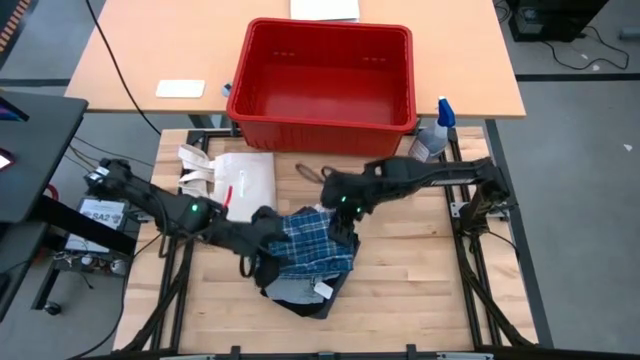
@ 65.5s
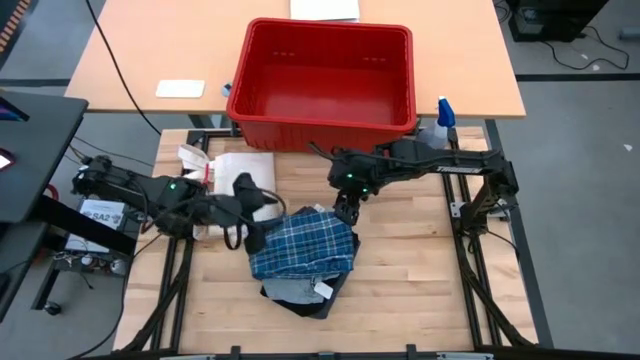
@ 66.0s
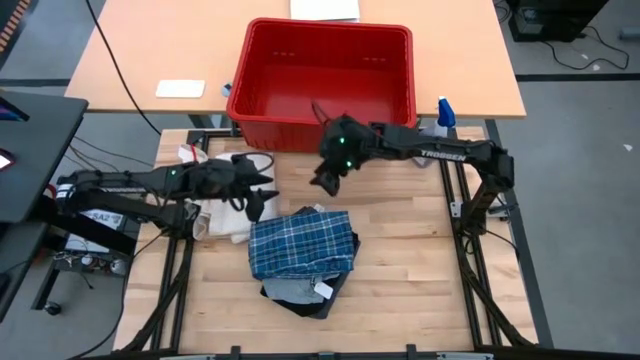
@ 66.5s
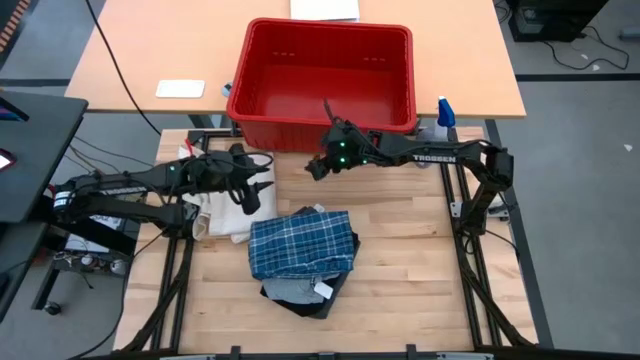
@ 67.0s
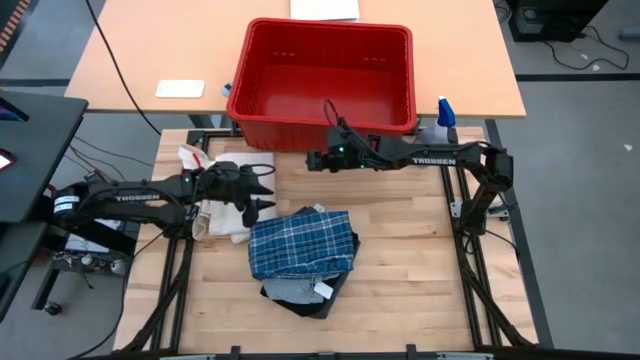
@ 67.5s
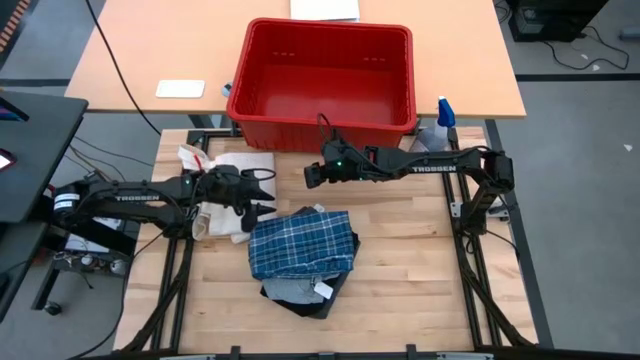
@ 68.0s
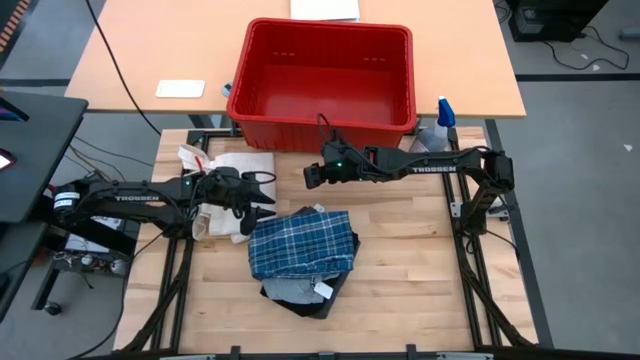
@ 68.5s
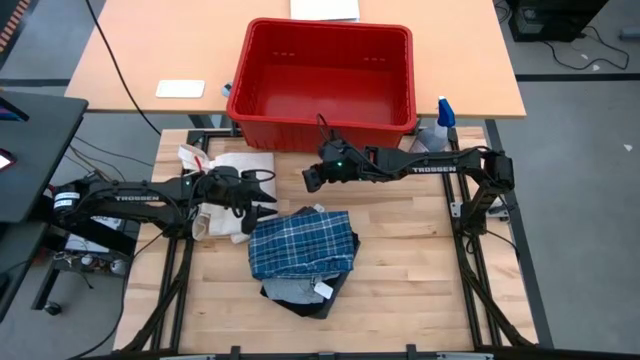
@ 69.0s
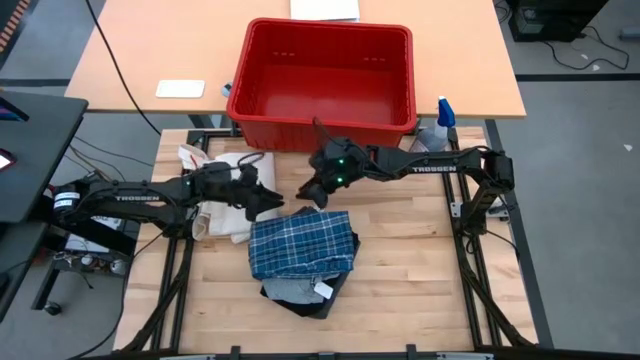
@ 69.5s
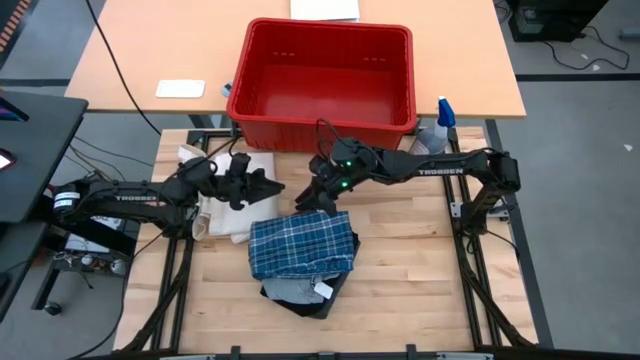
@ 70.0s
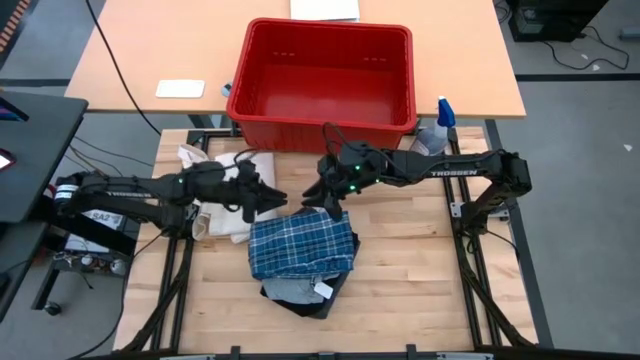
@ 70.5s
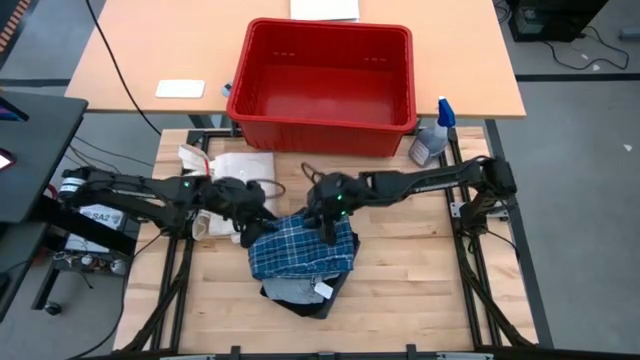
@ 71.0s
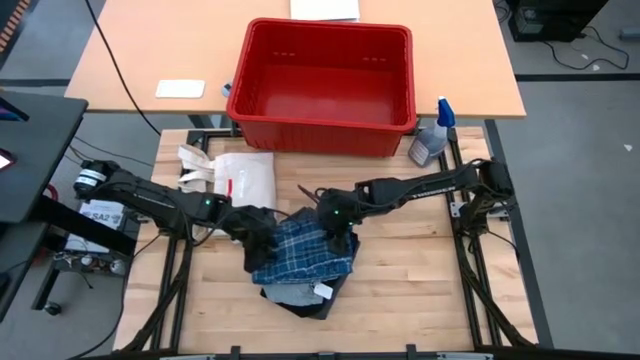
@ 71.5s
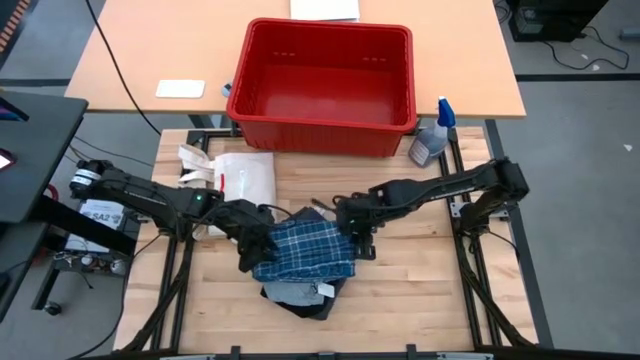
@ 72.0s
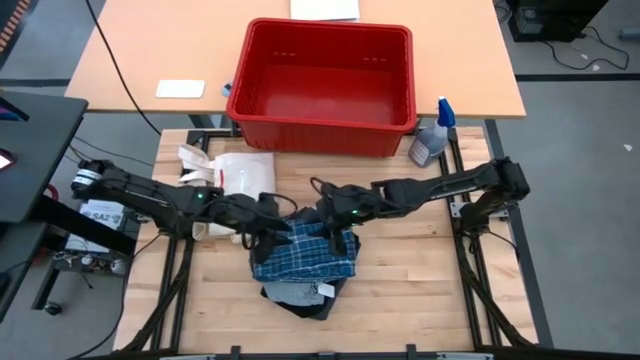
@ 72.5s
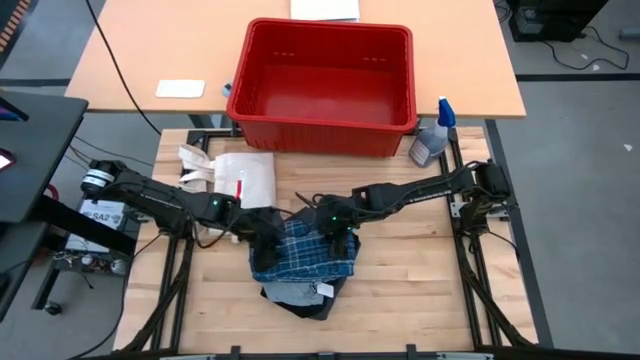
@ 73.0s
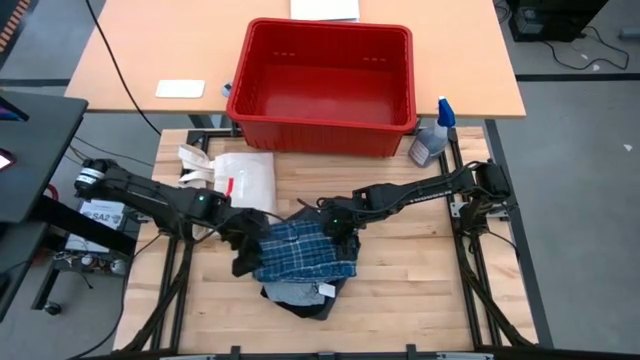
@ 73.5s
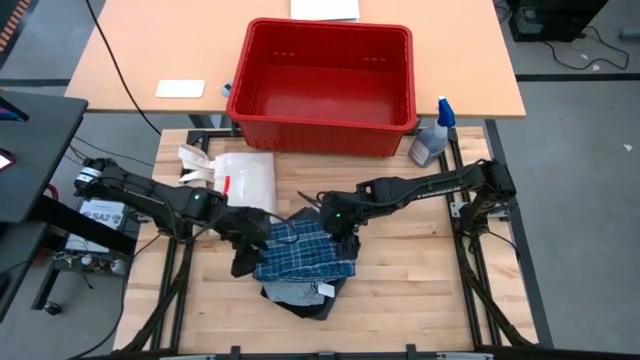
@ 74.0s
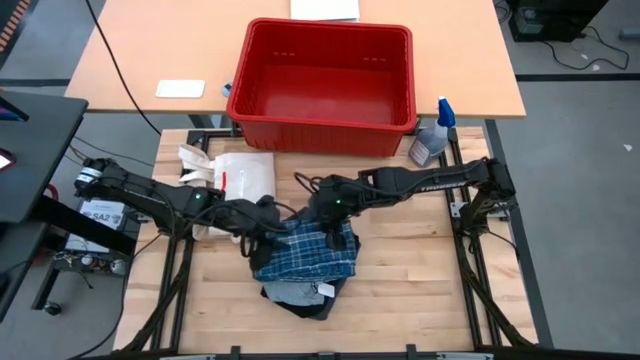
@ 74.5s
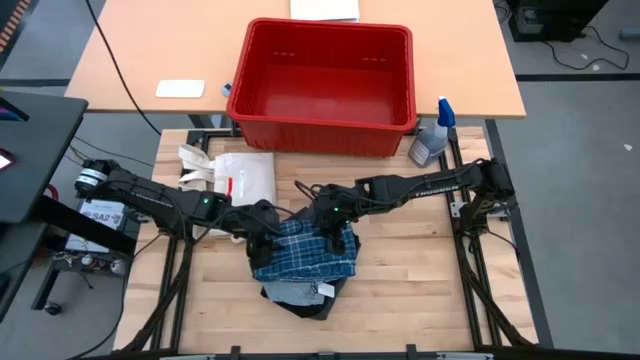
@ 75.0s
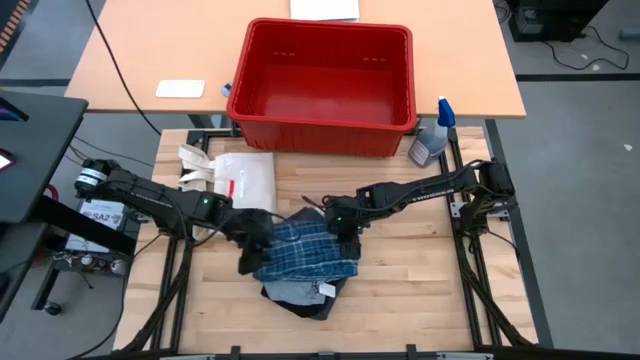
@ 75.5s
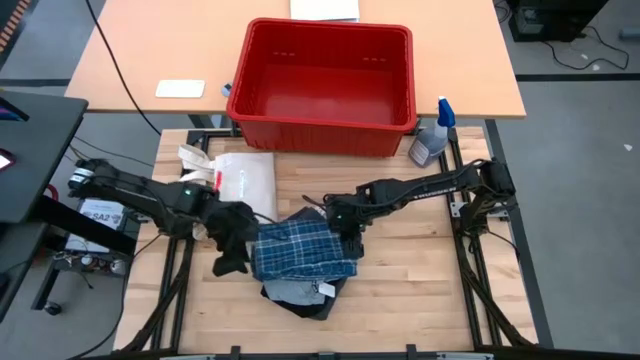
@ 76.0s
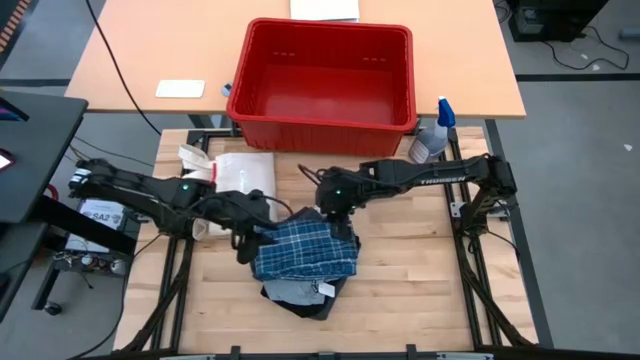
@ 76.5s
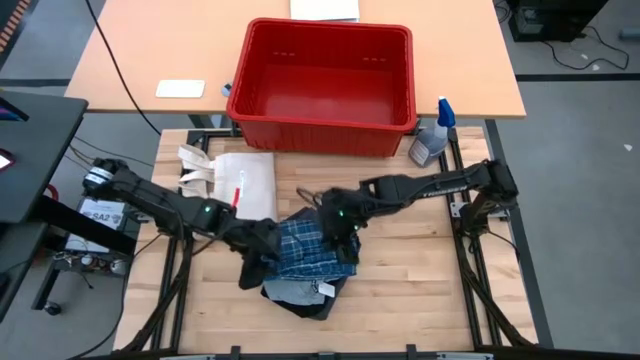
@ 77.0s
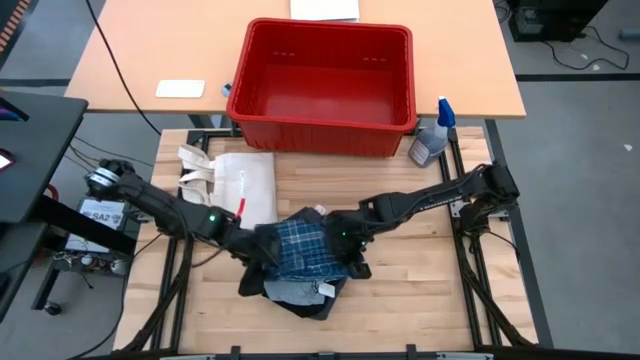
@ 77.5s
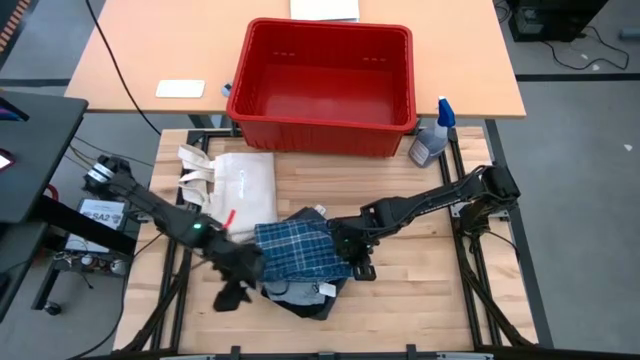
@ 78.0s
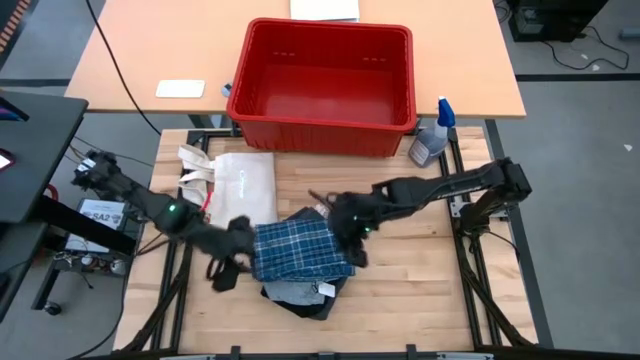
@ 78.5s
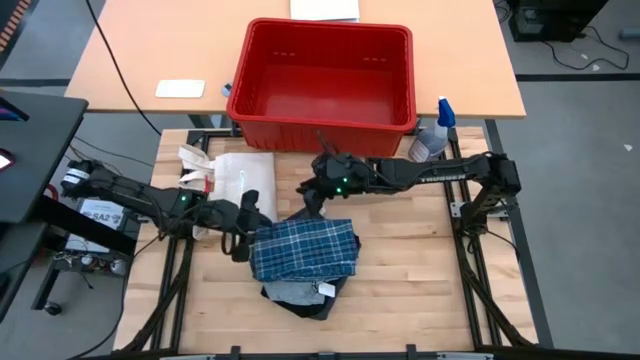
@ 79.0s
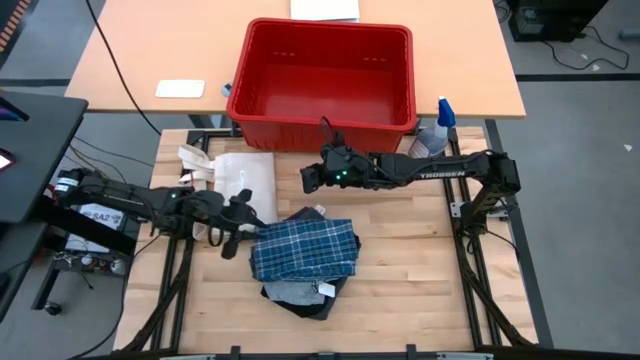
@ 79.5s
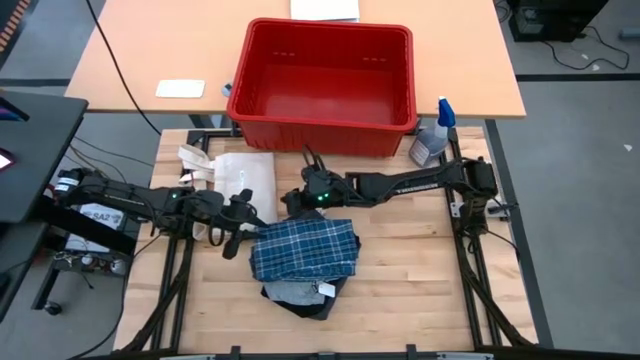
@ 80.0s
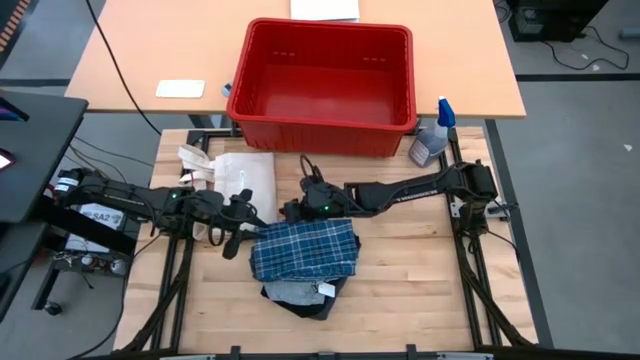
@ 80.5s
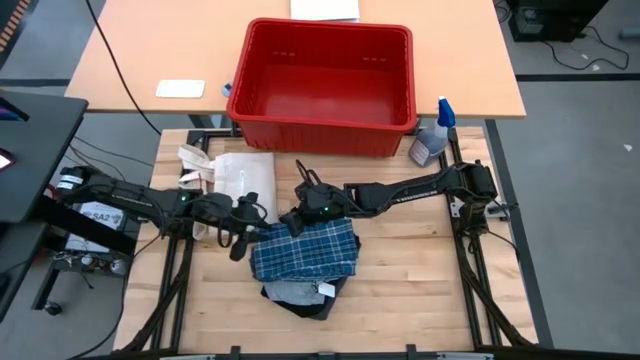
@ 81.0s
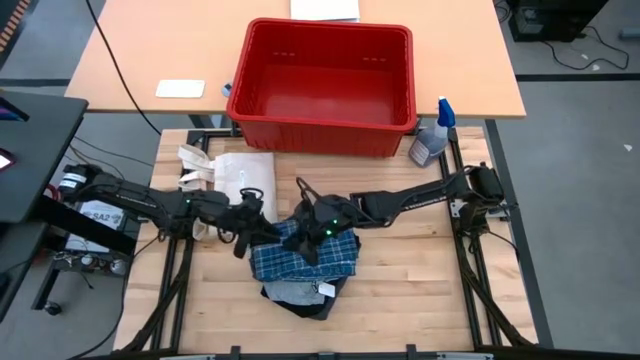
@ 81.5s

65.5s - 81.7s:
Task: Sort clothes
Adjust the blue pants on top of the stacked clothes

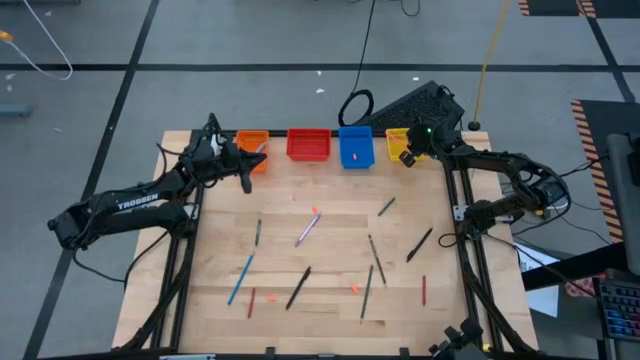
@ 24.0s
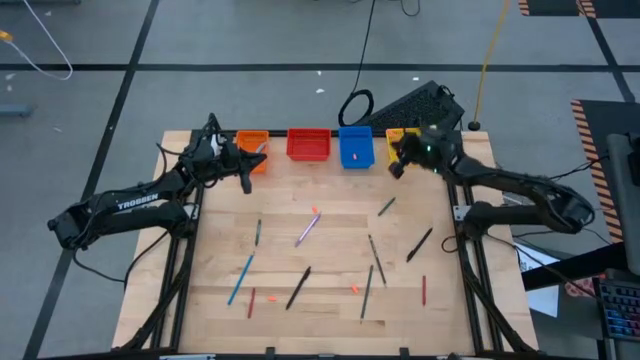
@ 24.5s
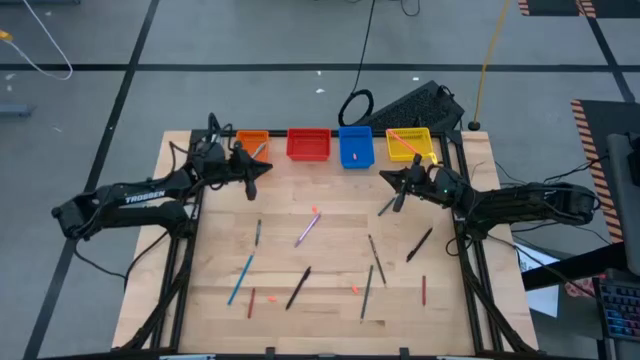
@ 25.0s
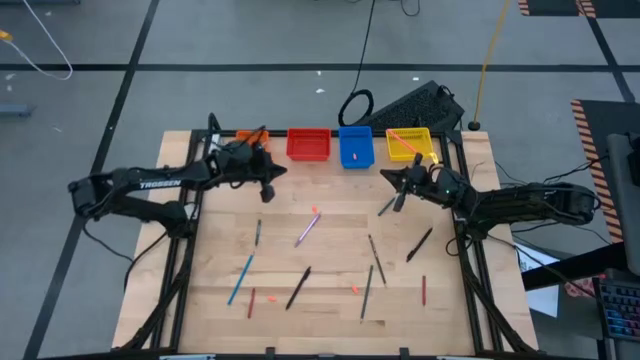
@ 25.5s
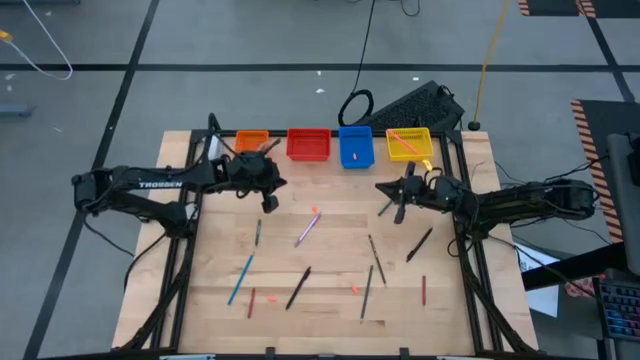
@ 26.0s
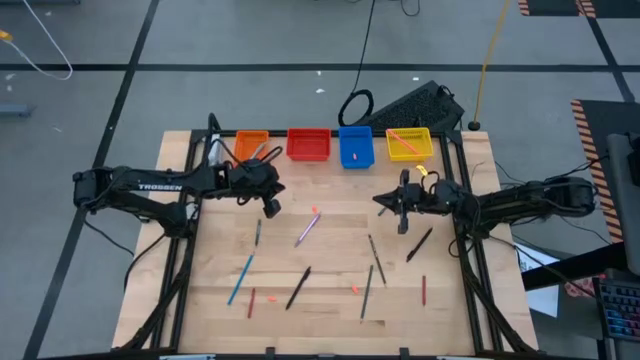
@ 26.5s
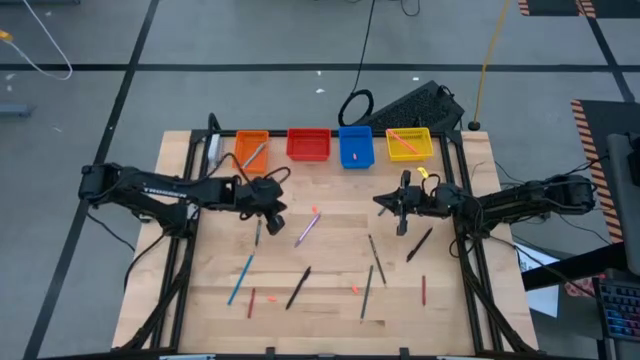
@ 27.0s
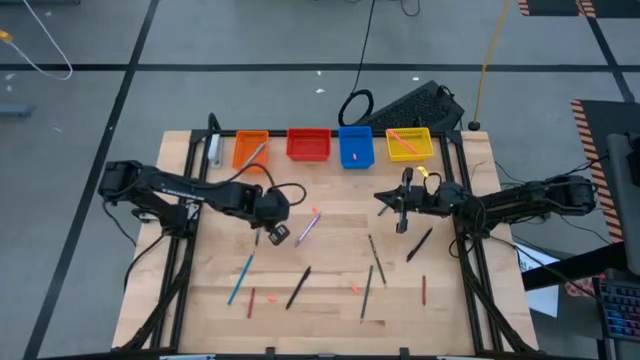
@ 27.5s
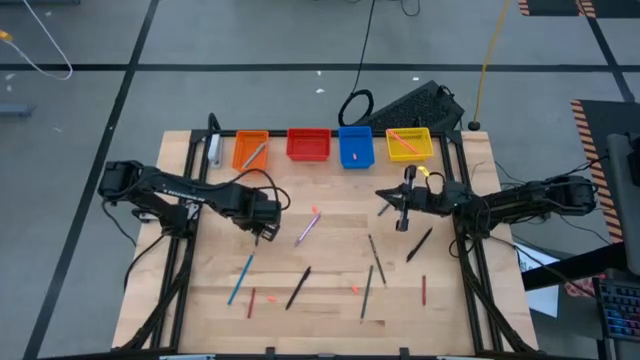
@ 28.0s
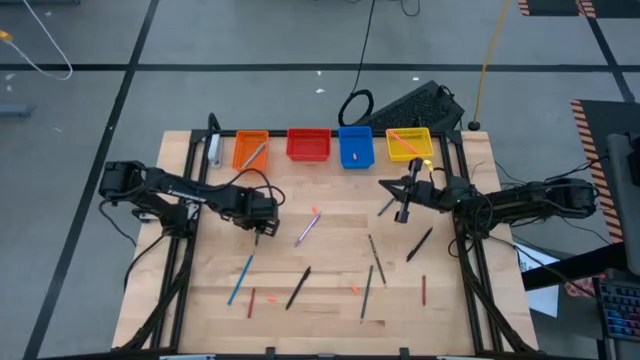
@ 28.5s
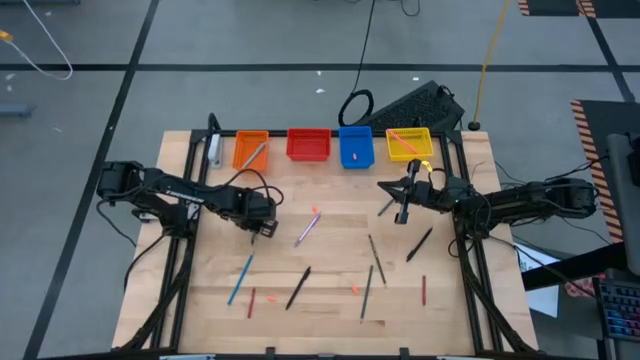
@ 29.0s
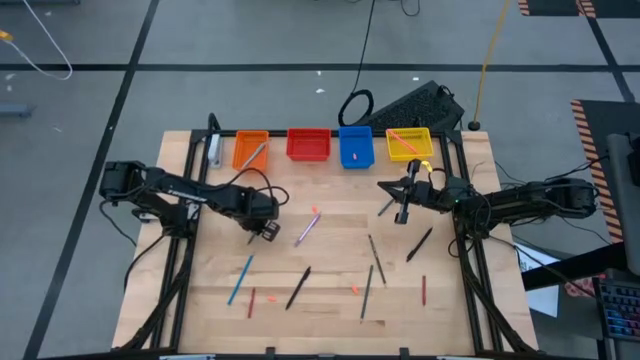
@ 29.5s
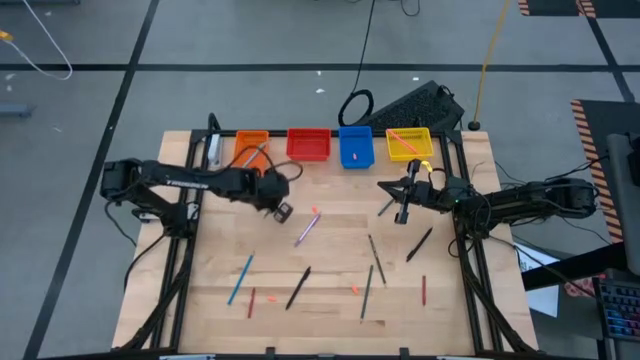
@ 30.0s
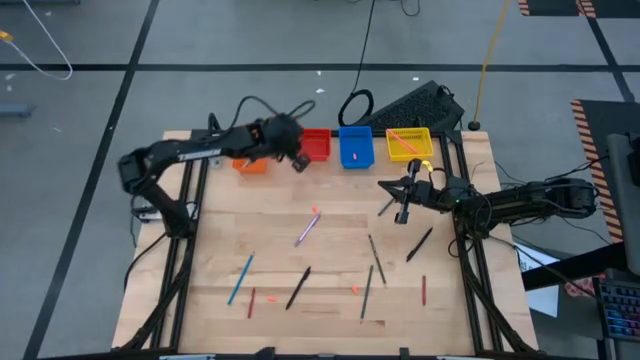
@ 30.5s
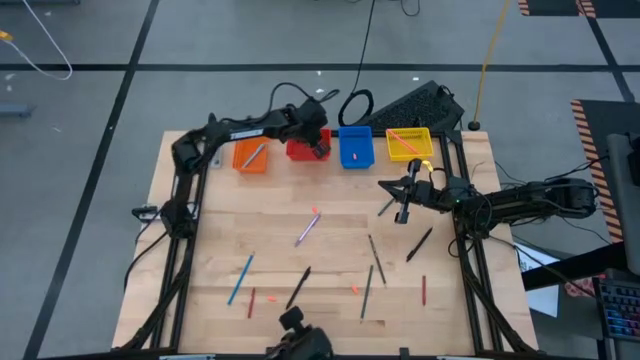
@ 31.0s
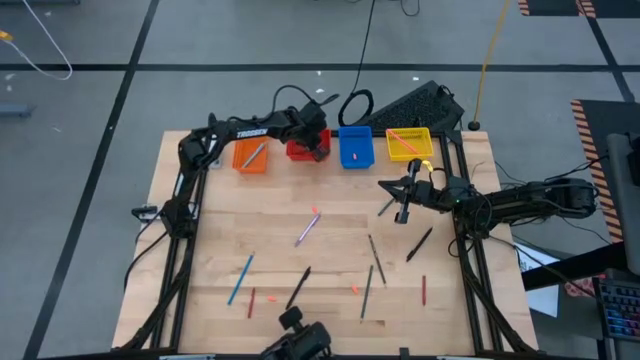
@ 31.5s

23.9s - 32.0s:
Task: Sort crayons/erasers/pens/pencils in bins
Put the bottom green crayon into the red basket
